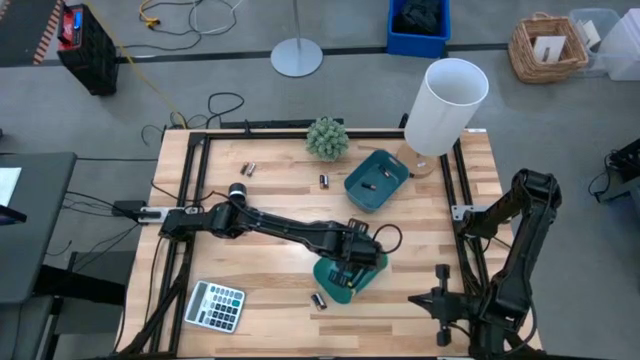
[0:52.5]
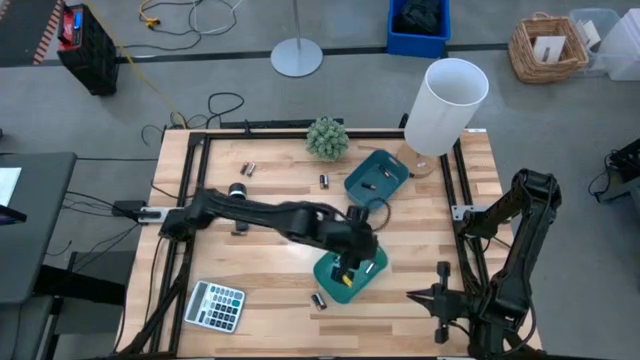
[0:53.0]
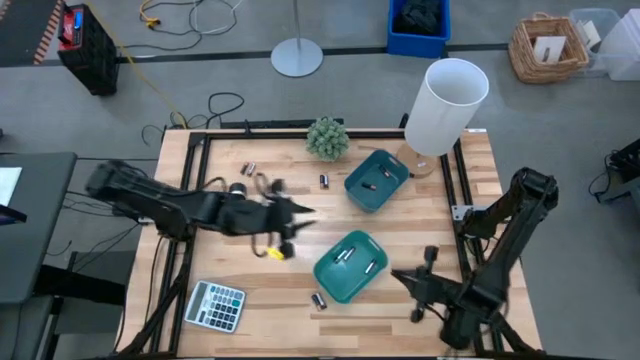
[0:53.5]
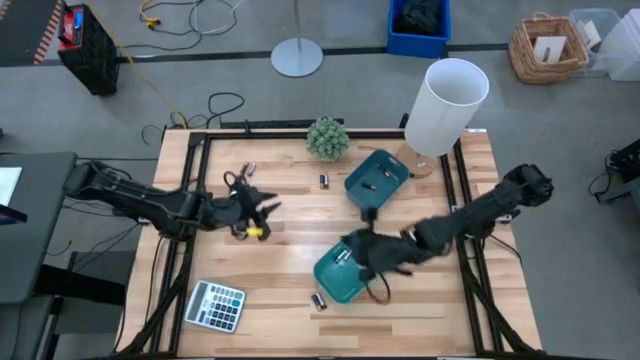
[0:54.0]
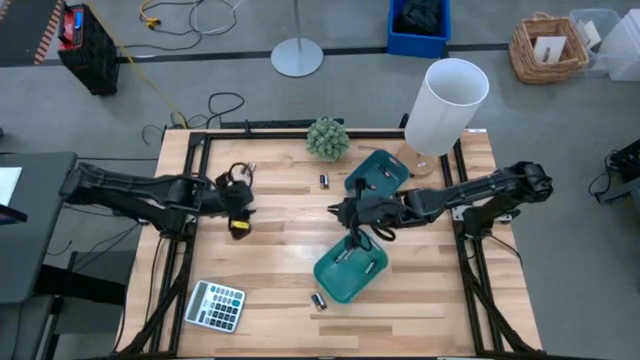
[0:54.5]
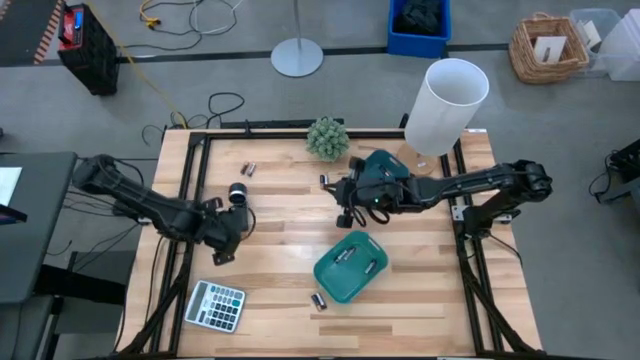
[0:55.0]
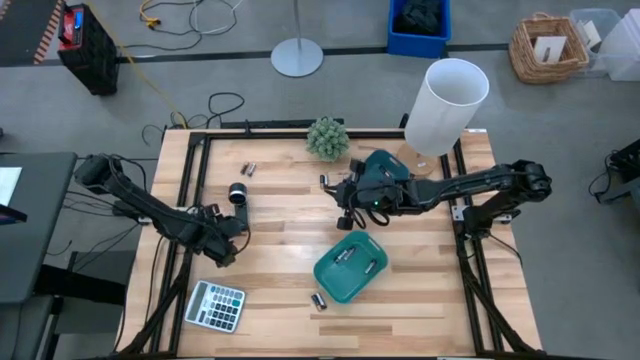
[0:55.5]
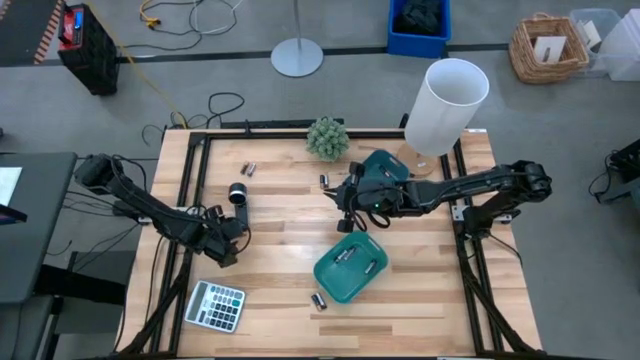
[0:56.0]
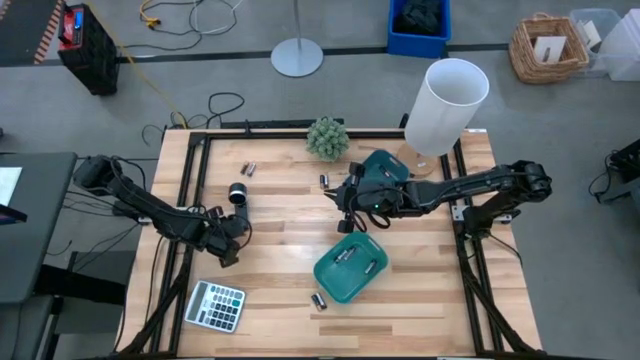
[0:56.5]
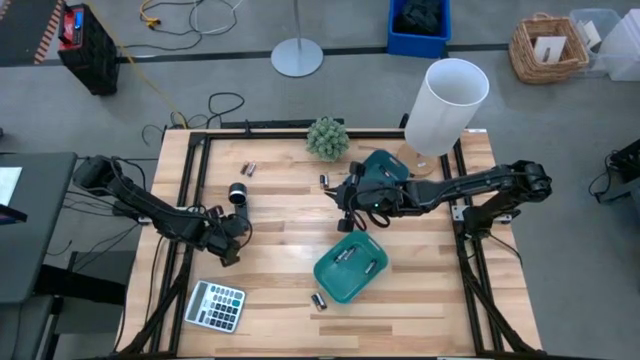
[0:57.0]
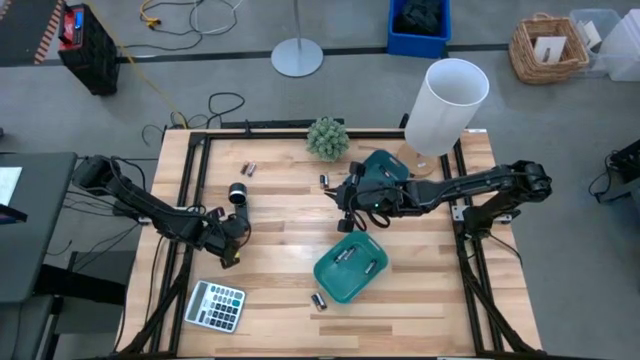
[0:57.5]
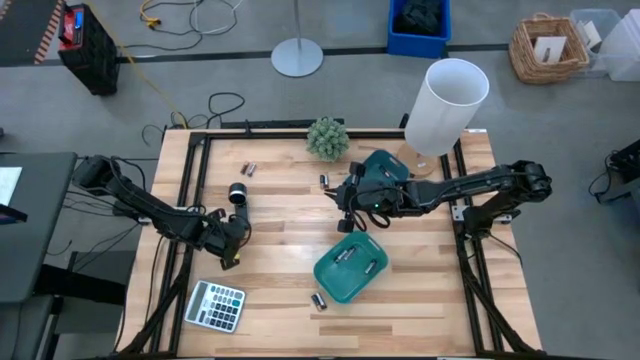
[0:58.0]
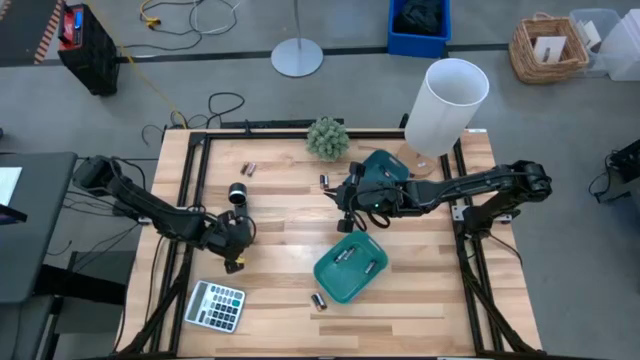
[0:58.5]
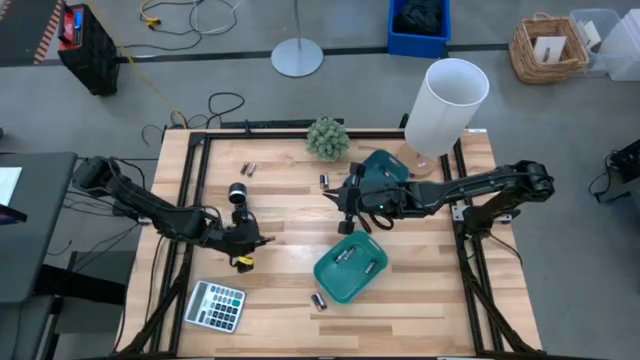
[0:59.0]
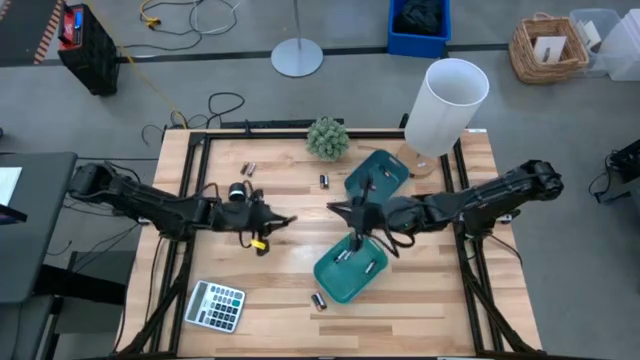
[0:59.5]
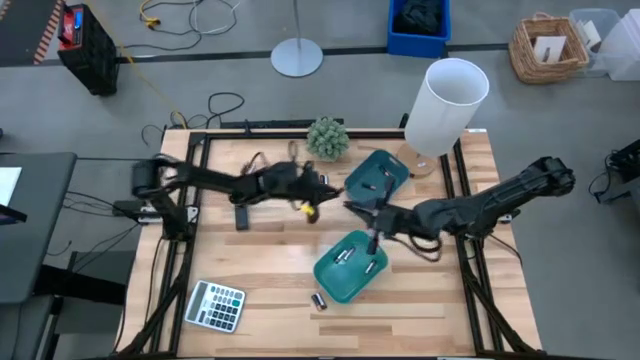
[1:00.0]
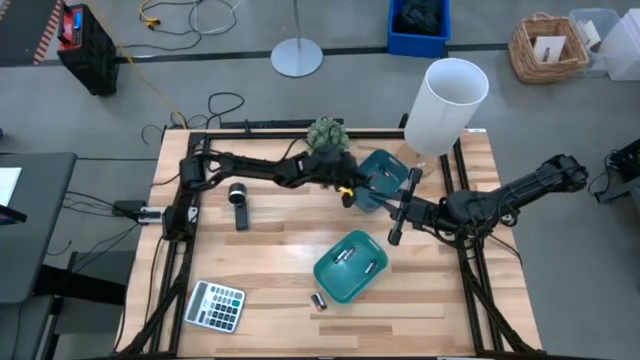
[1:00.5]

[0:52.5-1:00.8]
Task: Sort batteries
Put the black battery into the blue bin

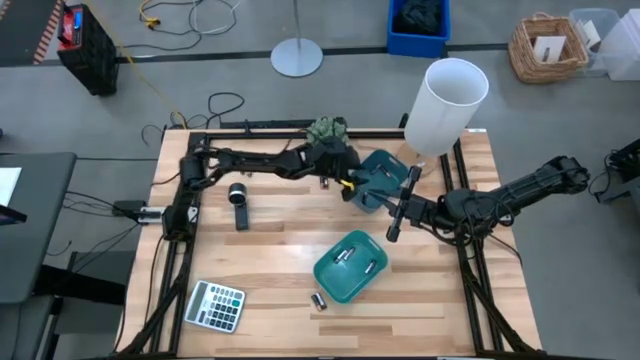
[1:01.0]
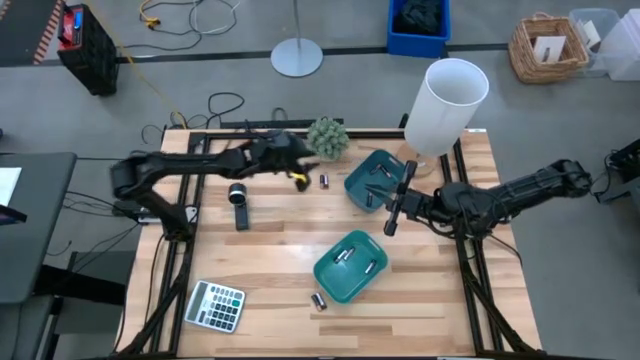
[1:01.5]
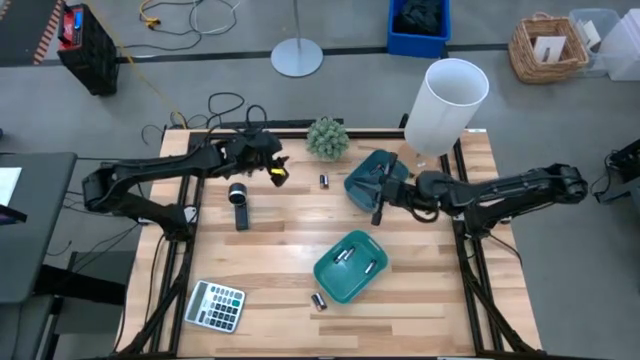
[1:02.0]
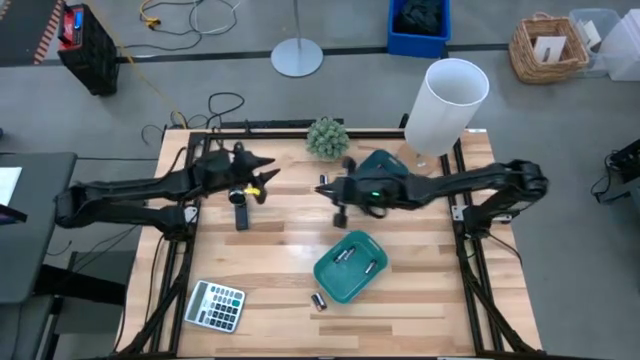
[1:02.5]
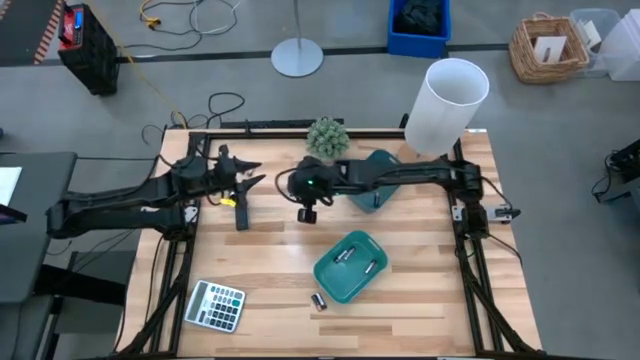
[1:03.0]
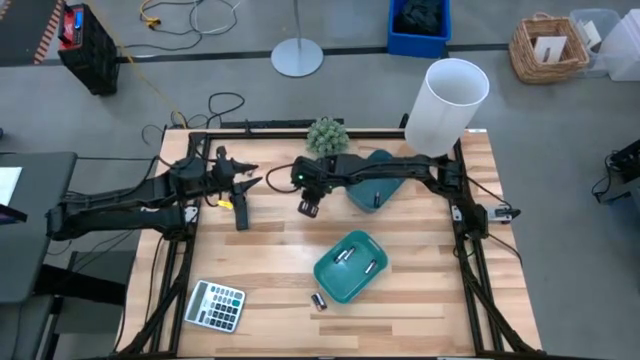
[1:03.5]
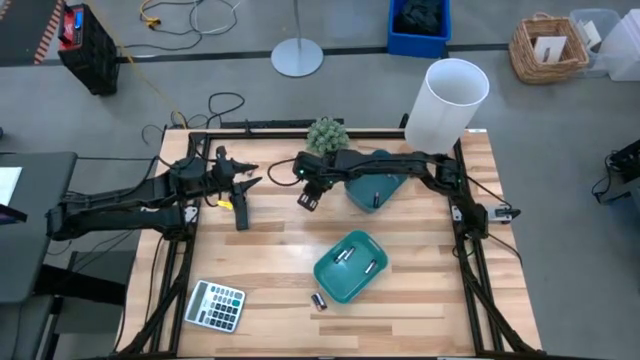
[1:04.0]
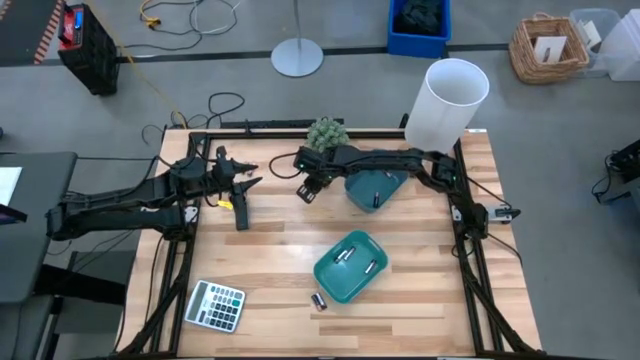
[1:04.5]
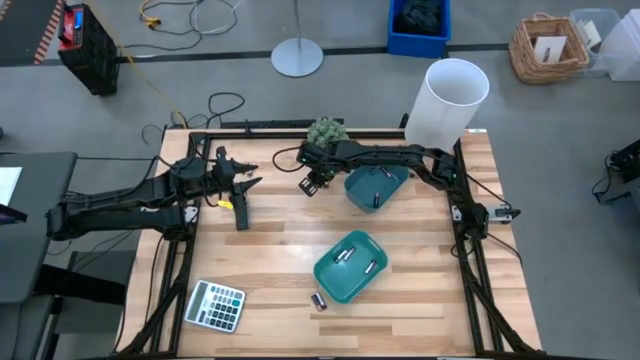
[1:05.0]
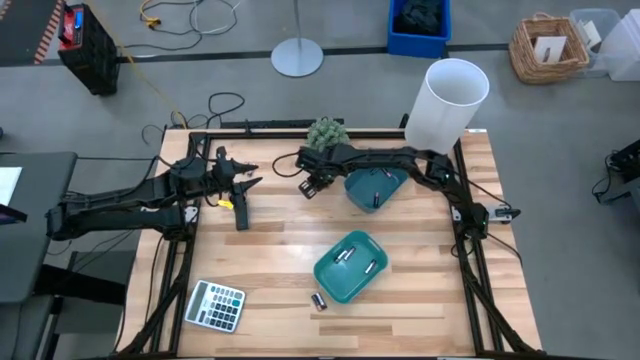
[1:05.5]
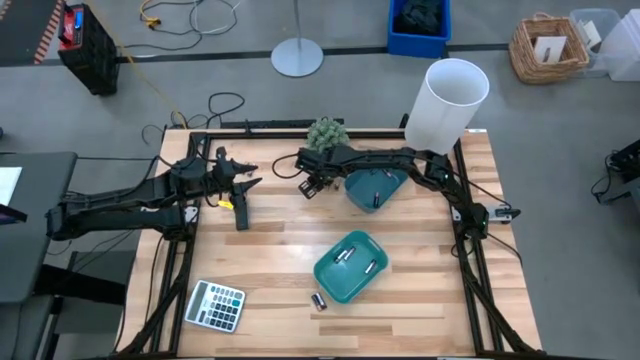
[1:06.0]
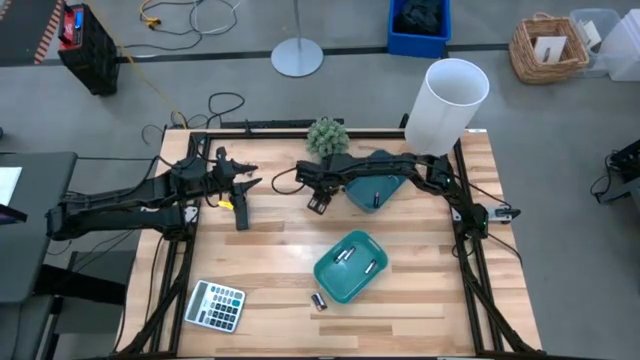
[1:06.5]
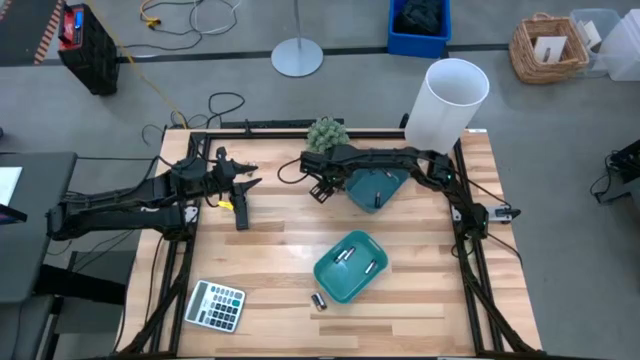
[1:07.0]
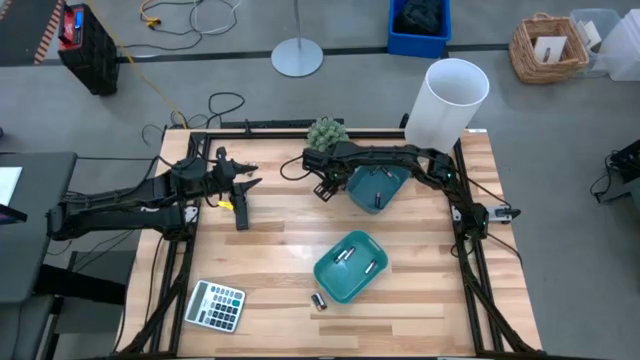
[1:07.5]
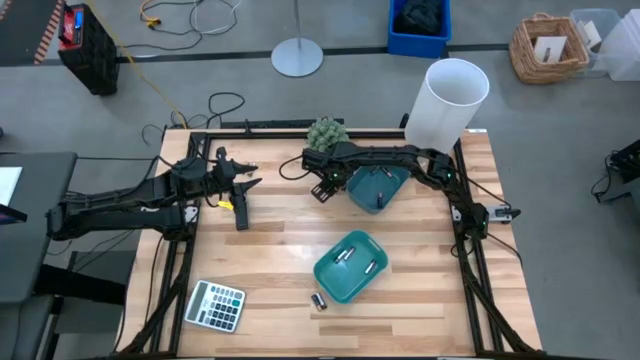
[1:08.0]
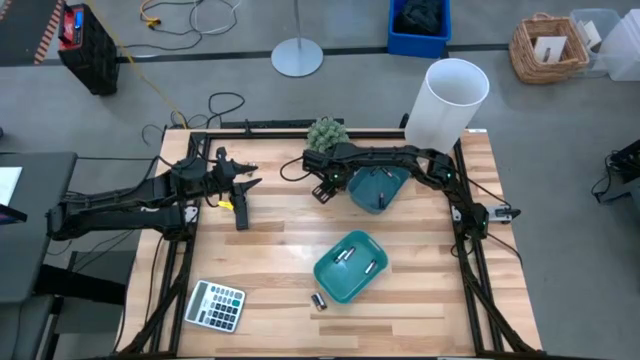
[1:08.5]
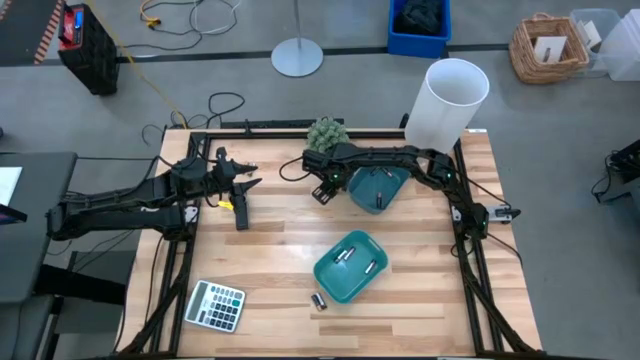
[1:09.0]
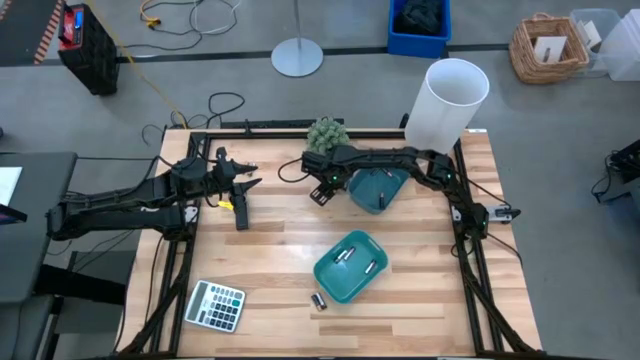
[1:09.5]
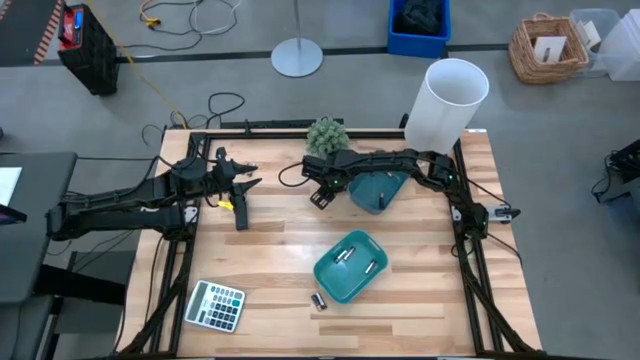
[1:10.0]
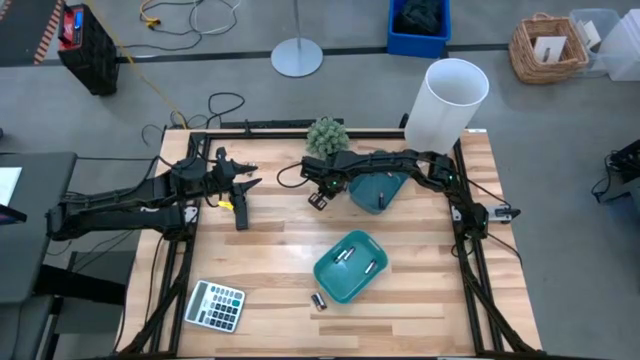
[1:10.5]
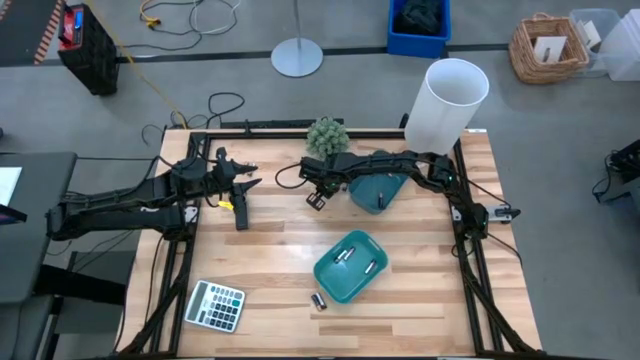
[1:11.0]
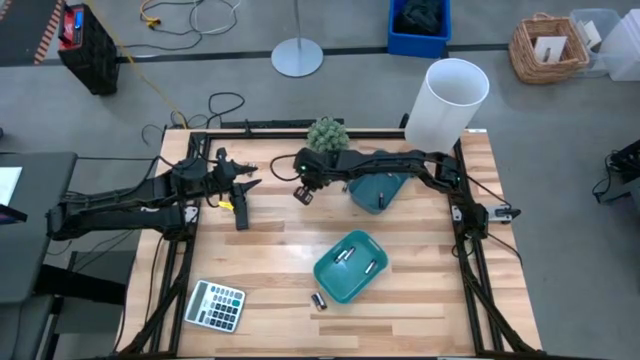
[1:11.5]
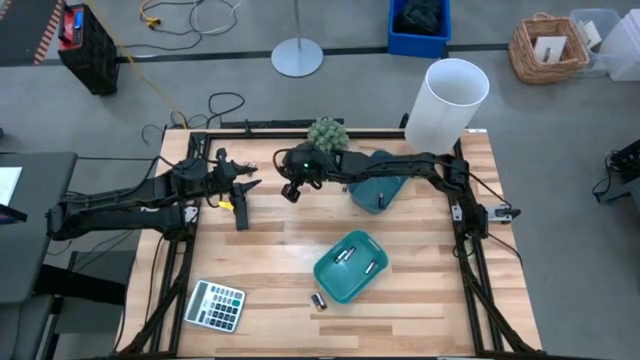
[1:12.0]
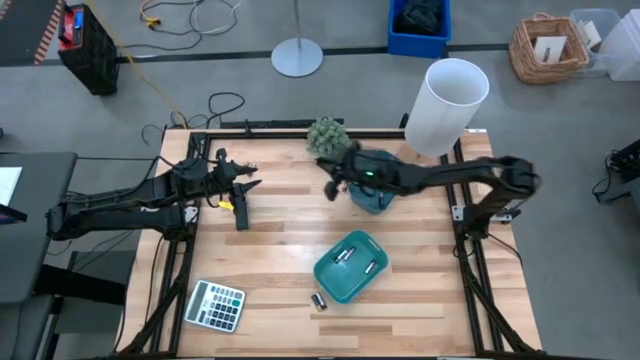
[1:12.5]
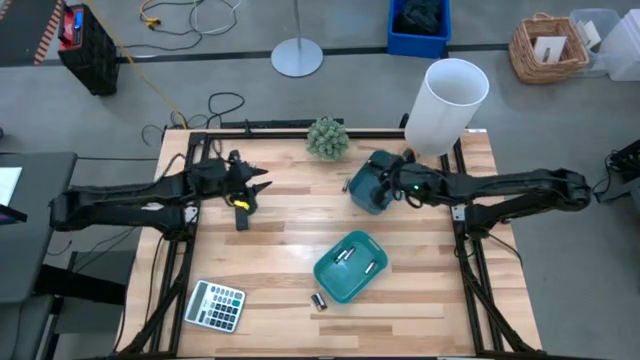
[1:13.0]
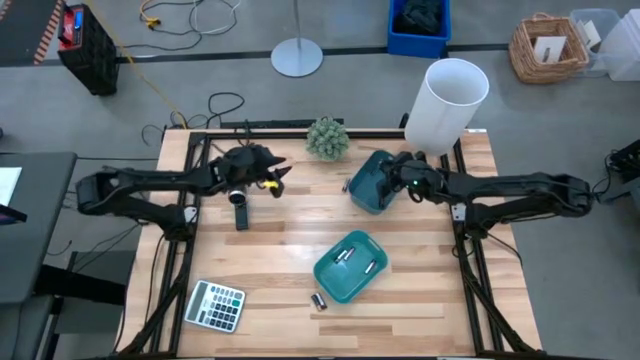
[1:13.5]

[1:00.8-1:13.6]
Put the black battery into the blue bin
